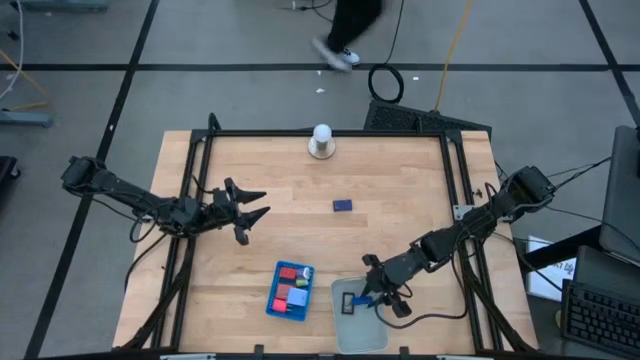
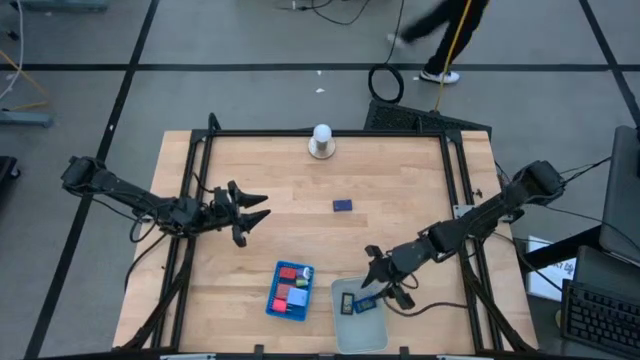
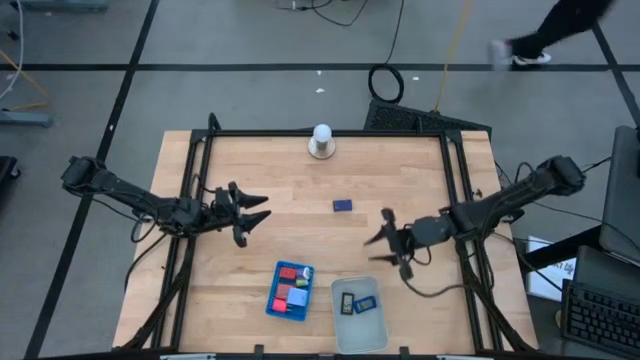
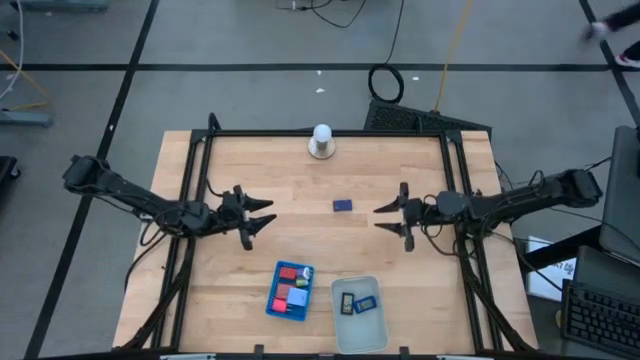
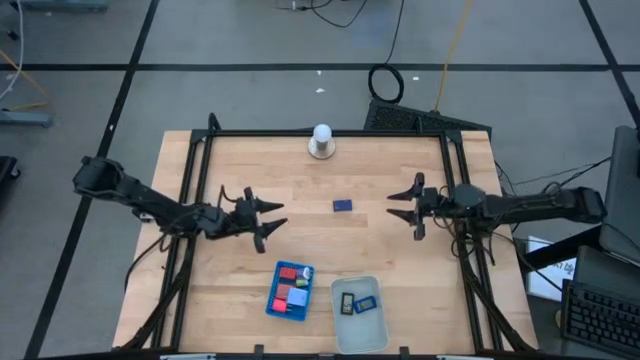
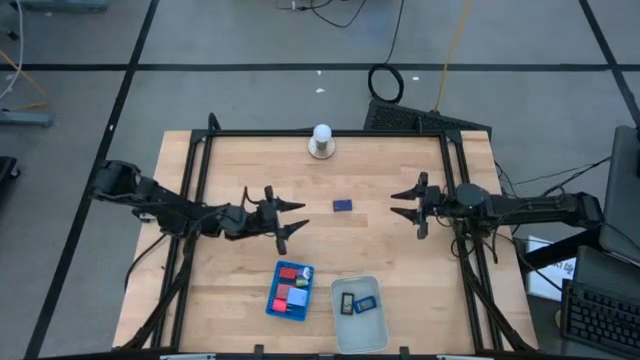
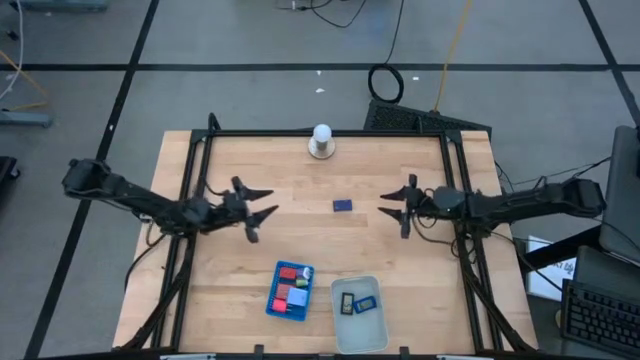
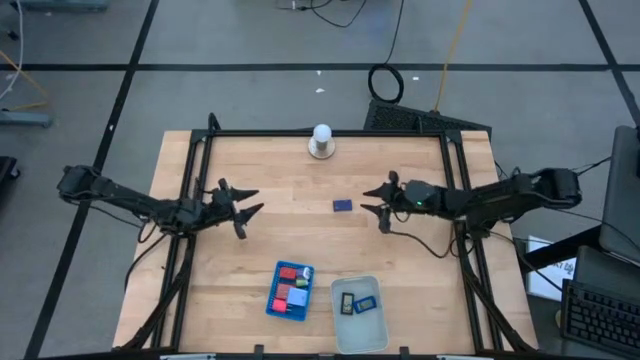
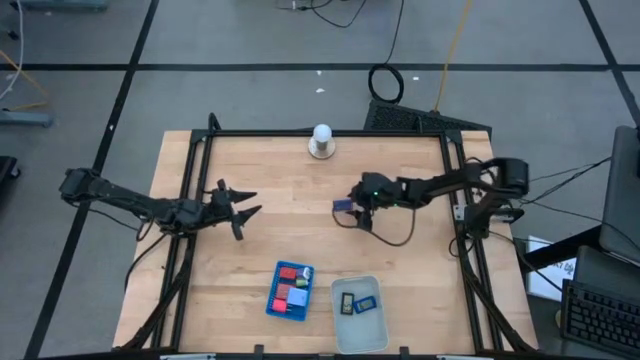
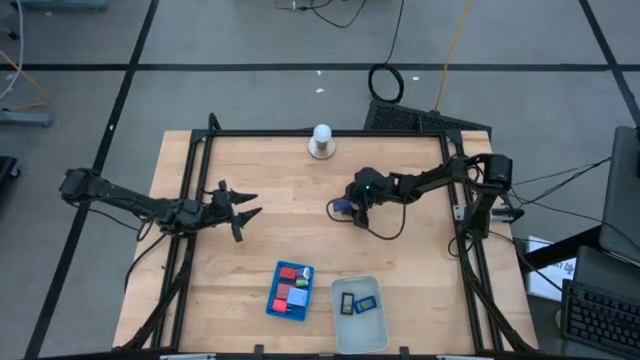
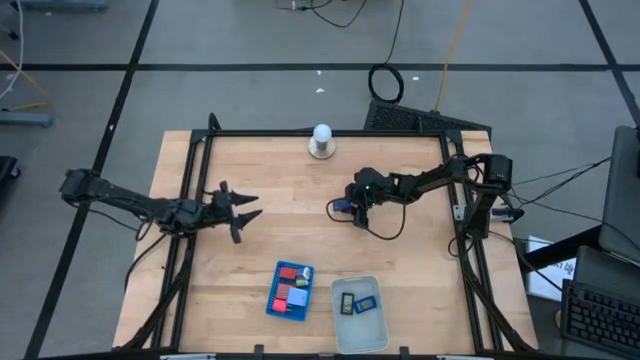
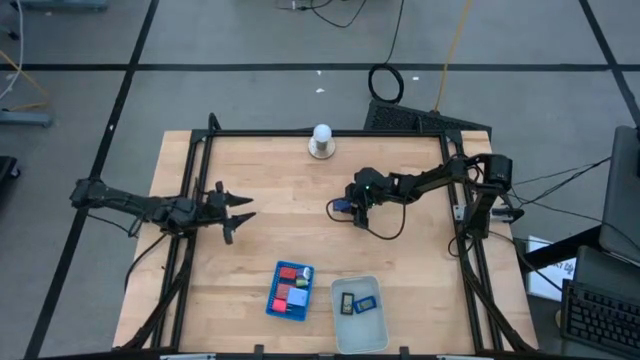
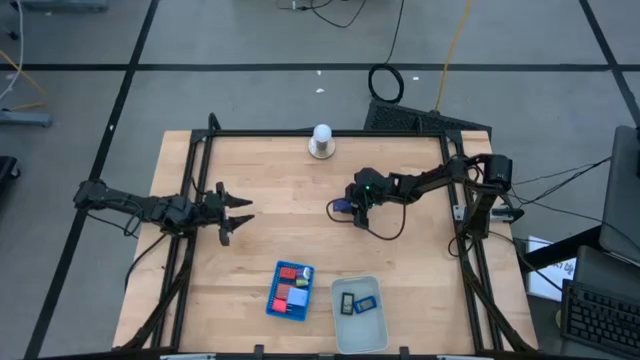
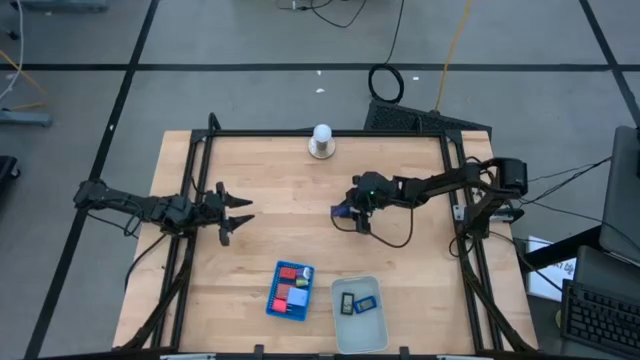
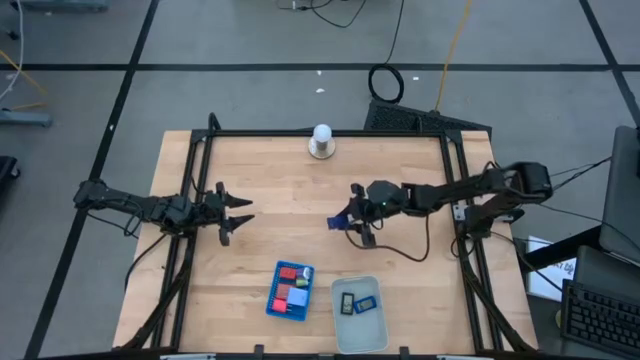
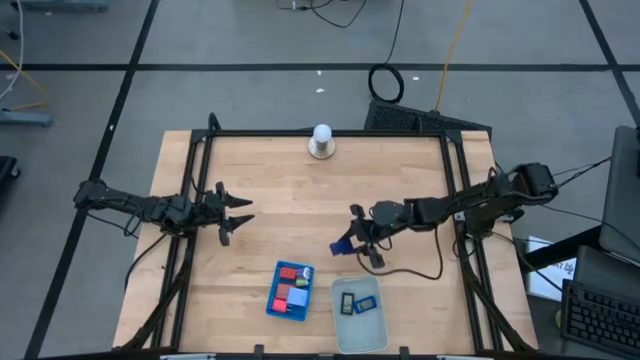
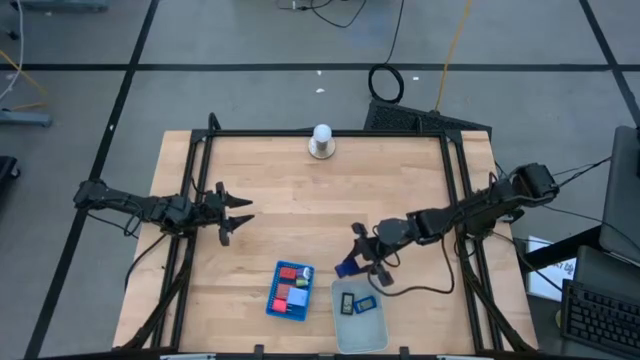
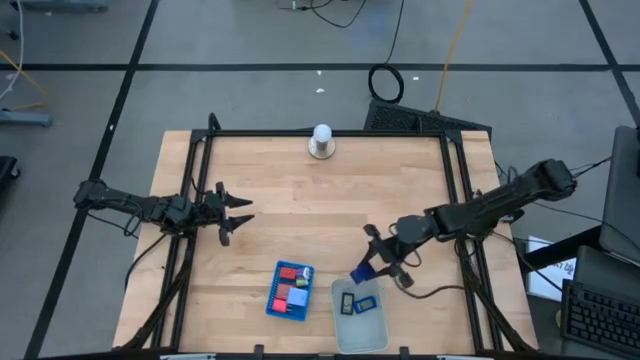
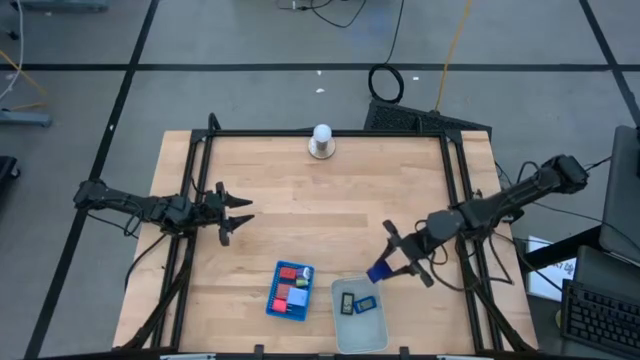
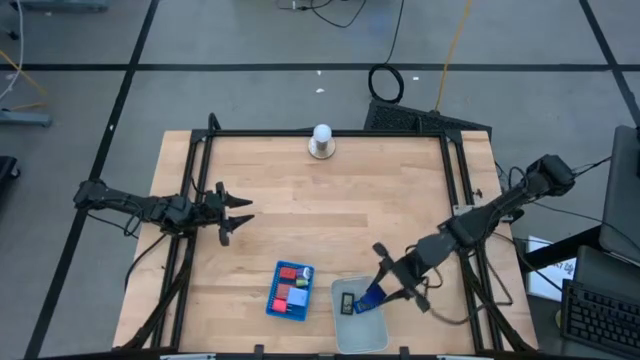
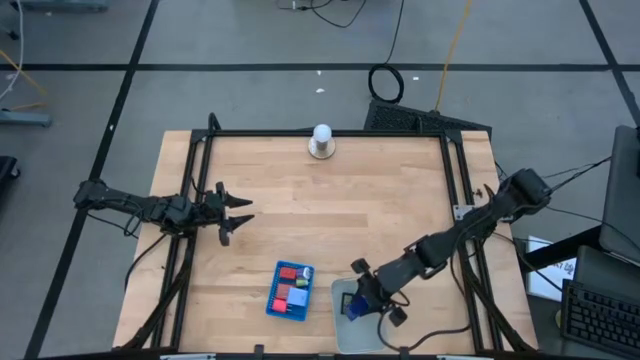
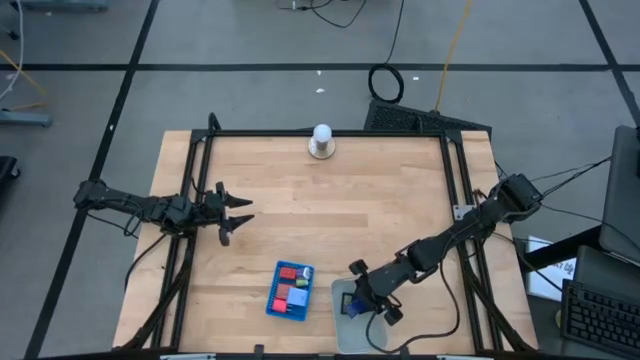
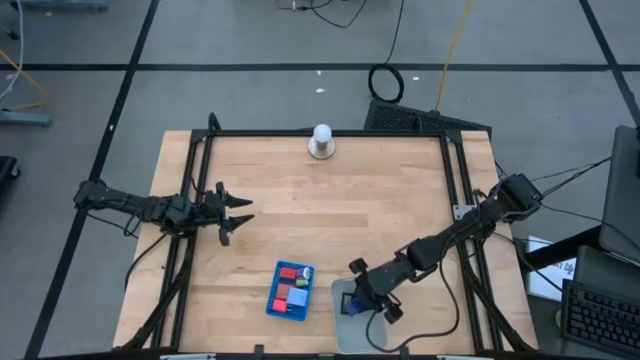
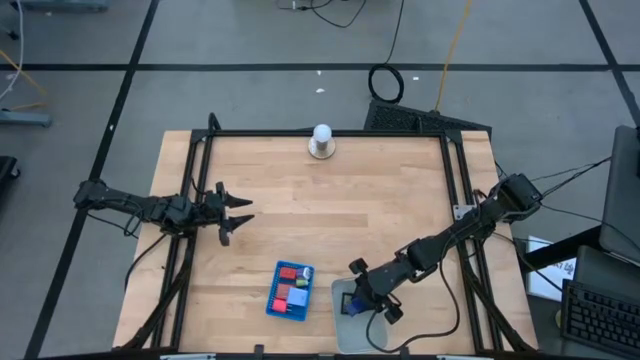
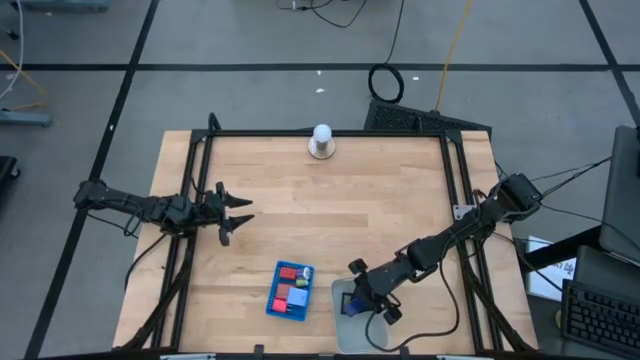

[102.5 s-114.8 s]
Task: Pick & Place Office items
Put the blue digital timer into the gray bin

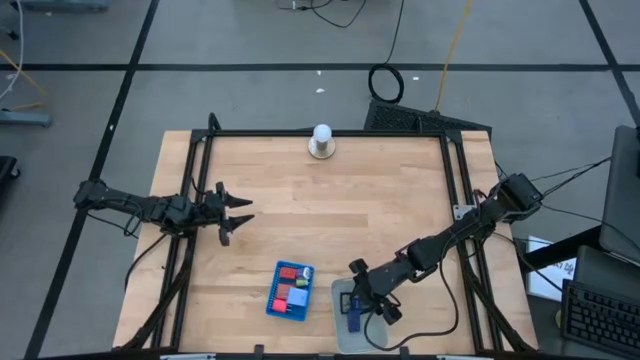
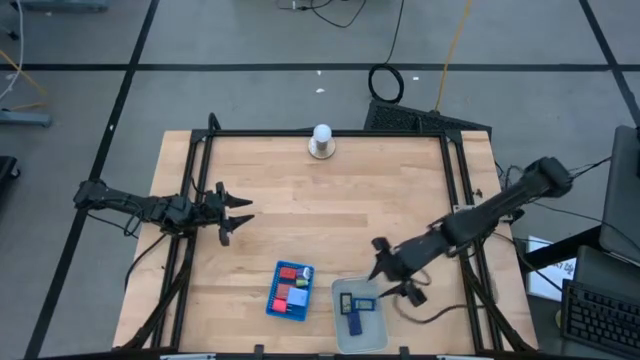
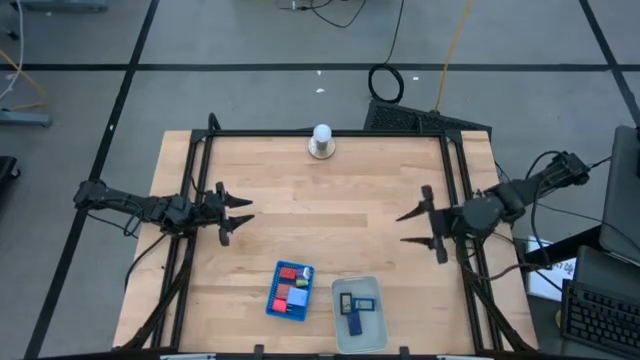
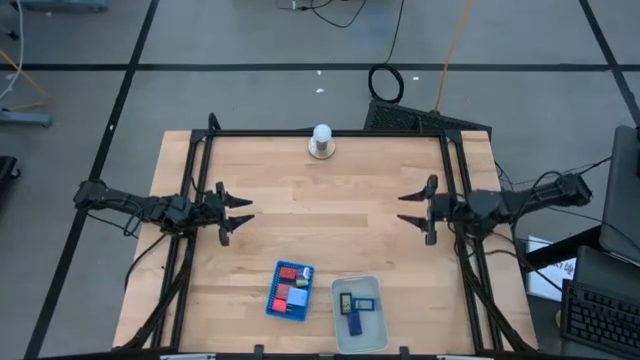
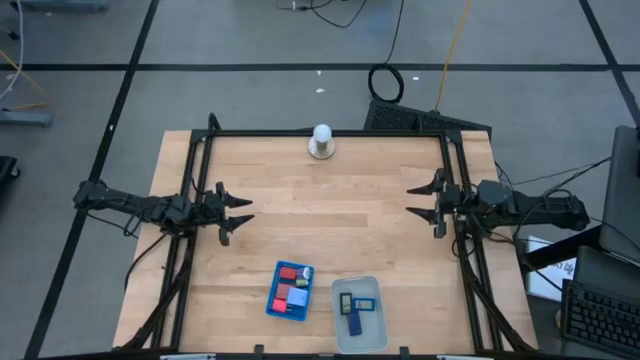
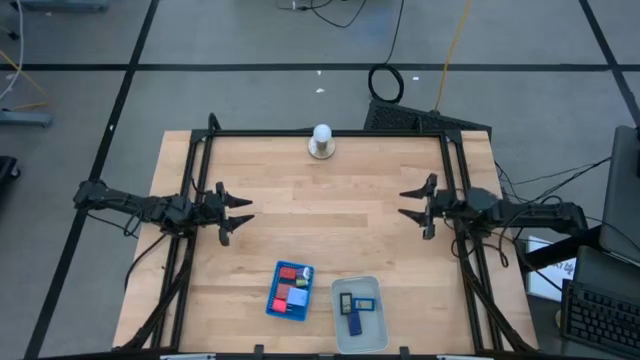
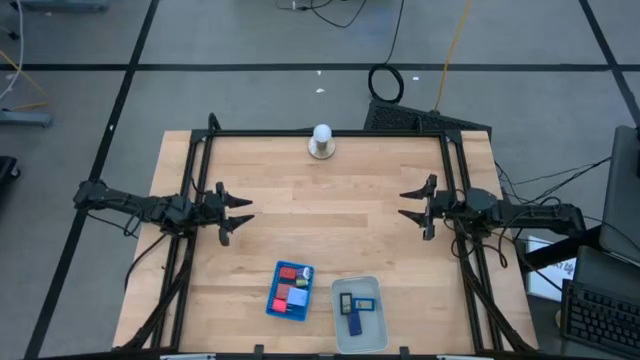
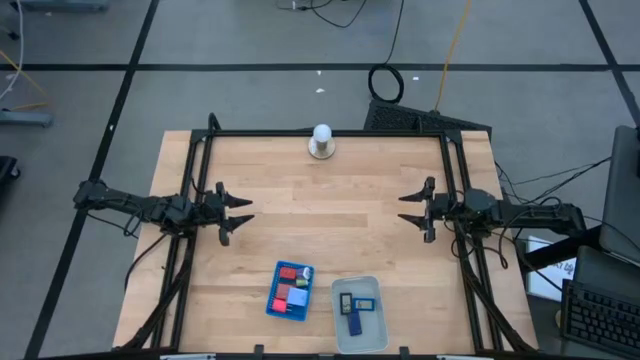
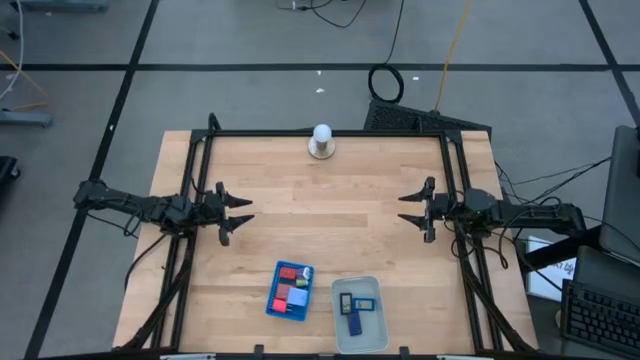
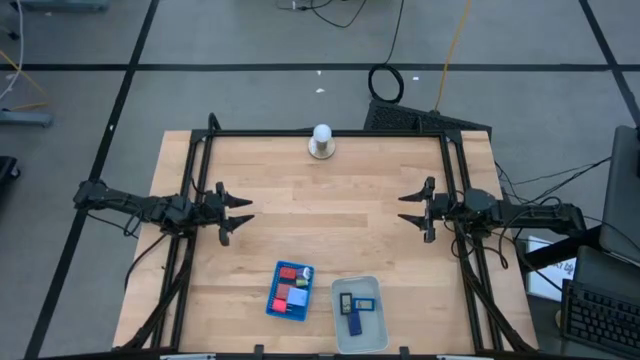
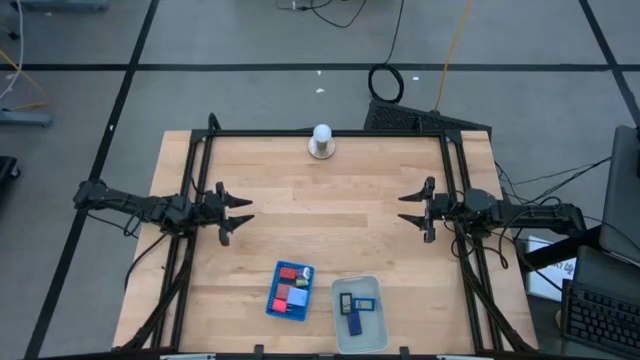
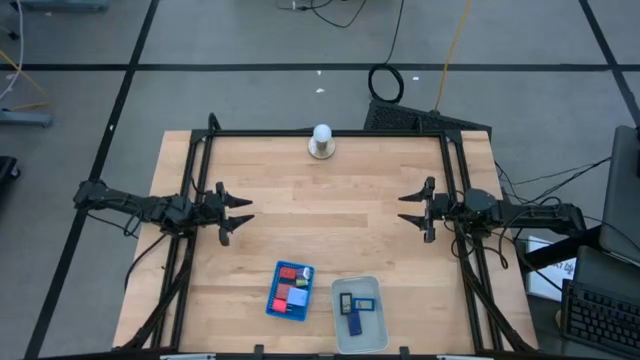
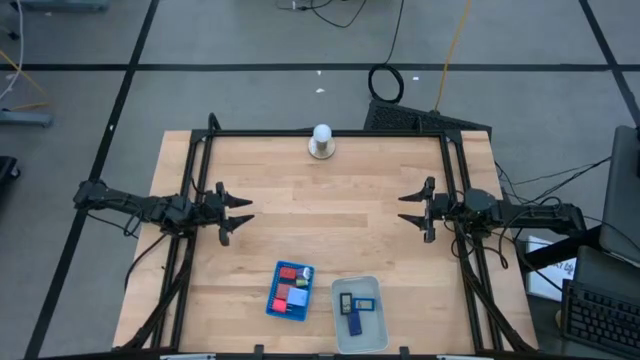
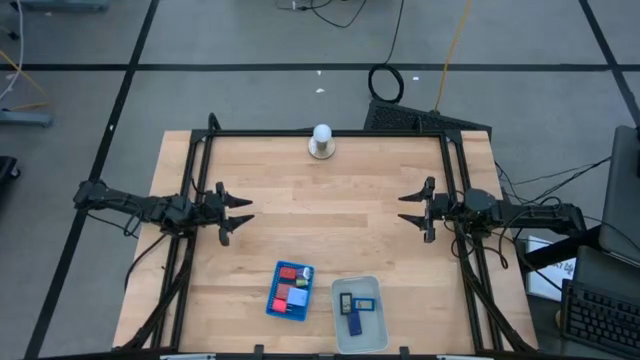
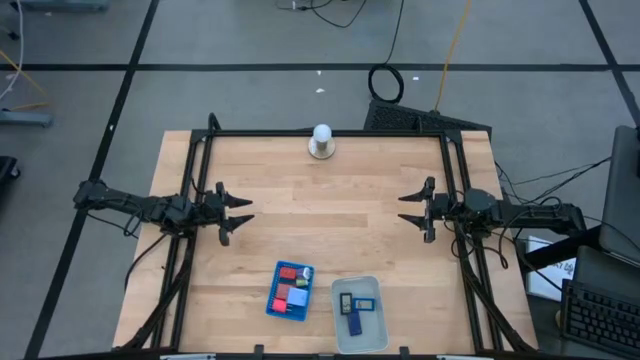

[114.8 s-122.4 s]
Return to Home Position

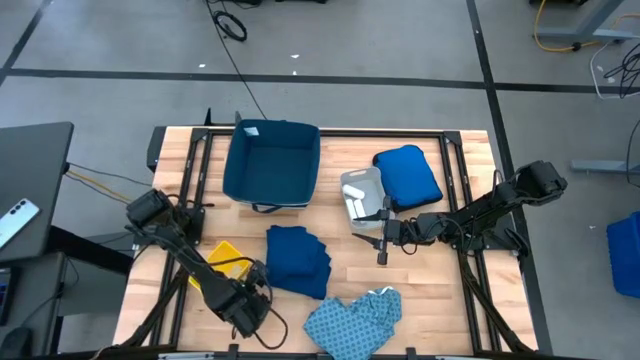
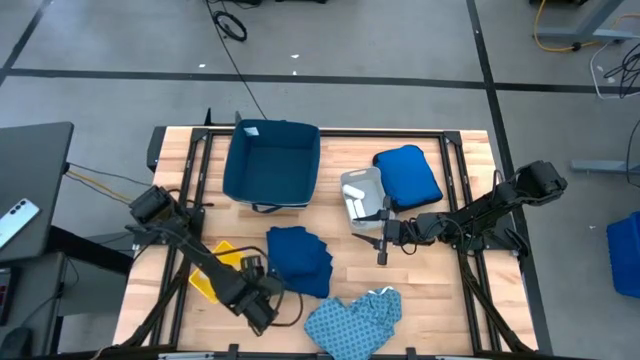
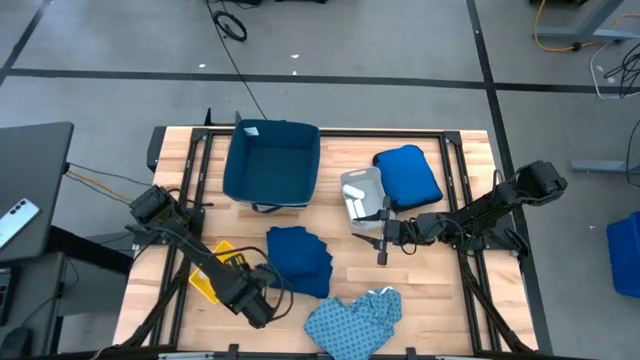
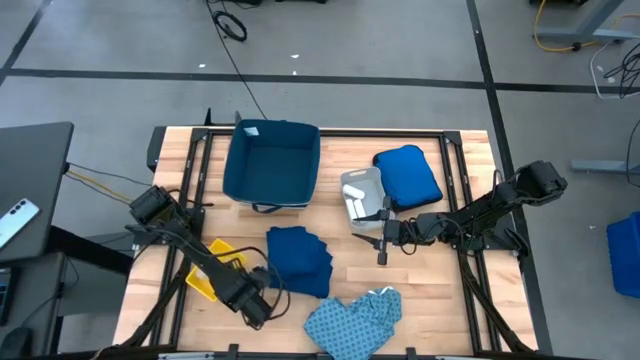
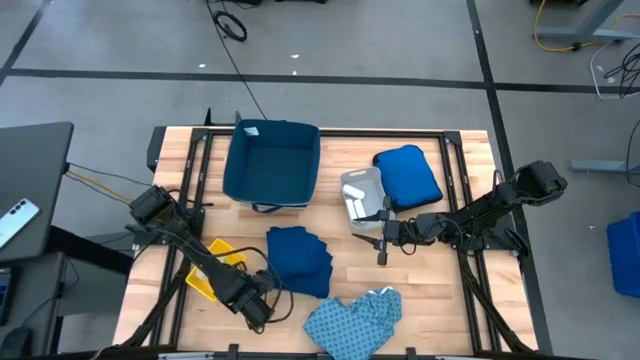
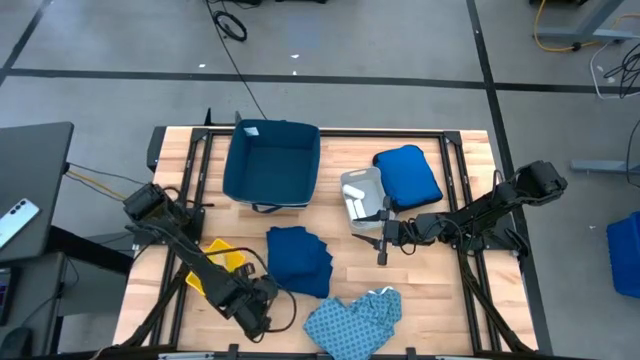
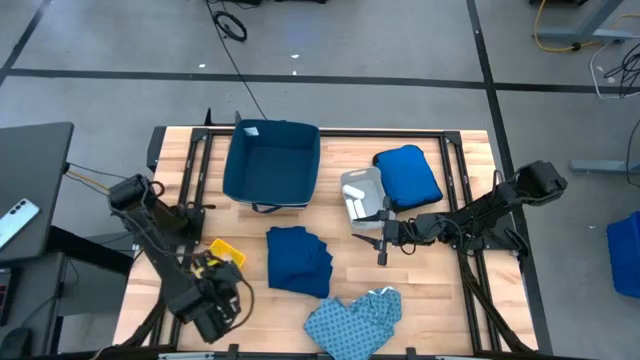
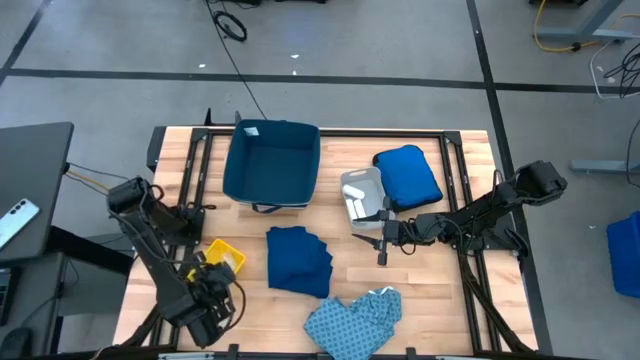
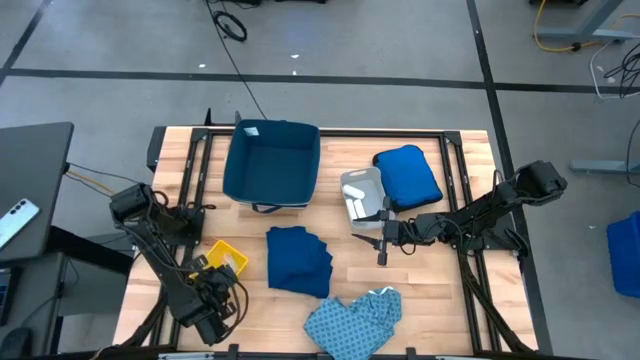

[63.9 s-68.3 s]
Task: Pick & place medical supplies in basket/bin
Put the transparent pill bottle into the yellow bin
